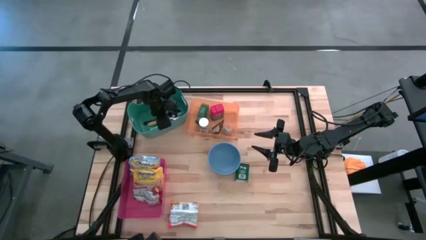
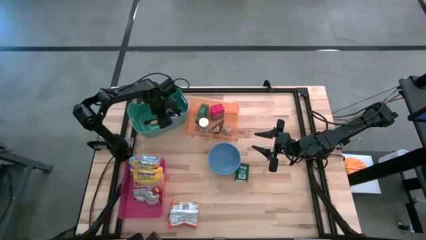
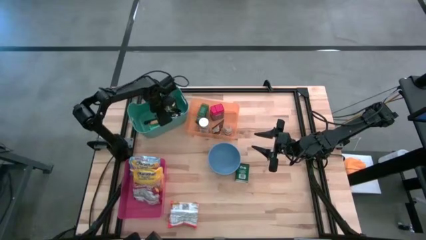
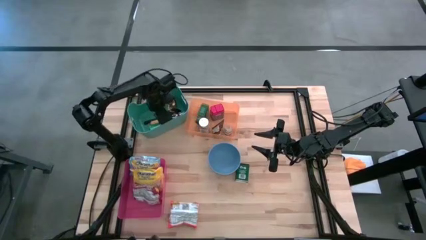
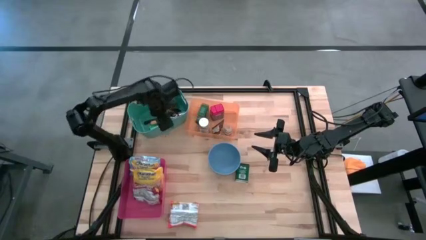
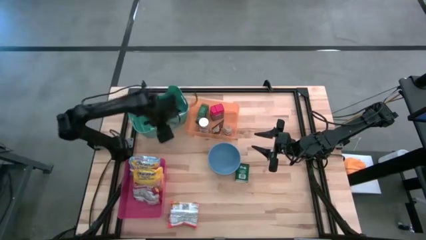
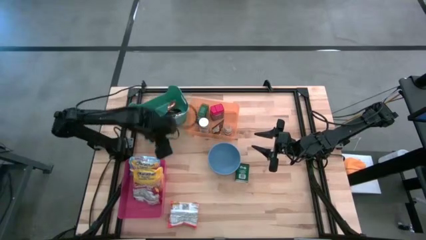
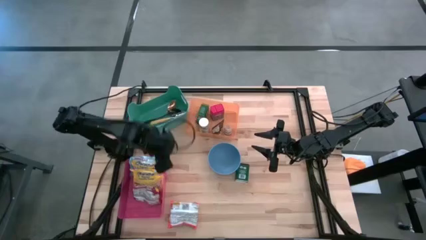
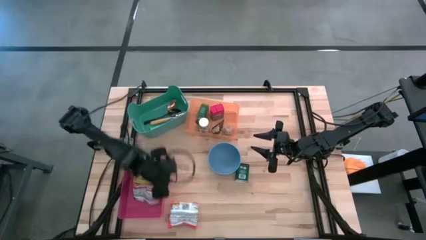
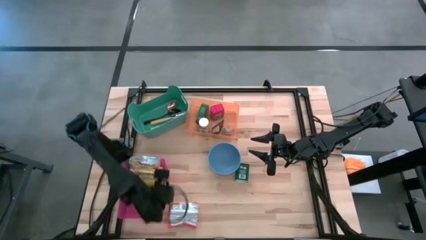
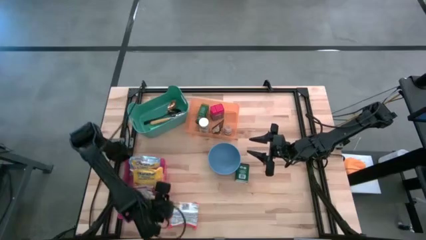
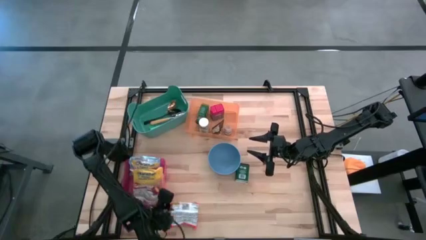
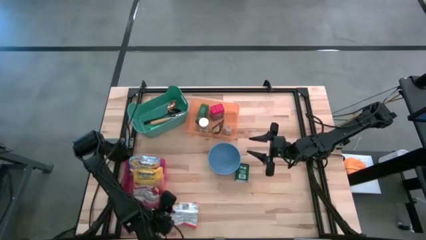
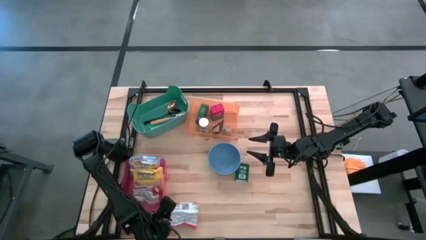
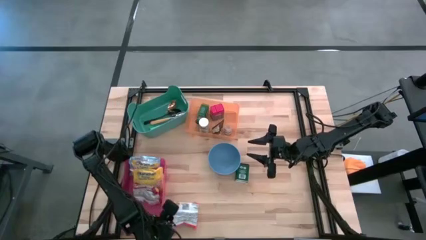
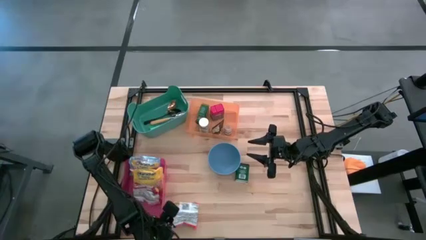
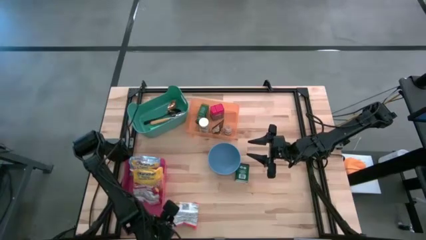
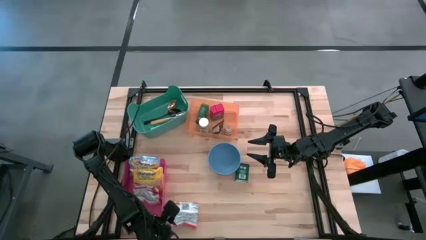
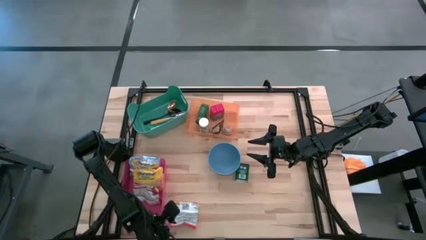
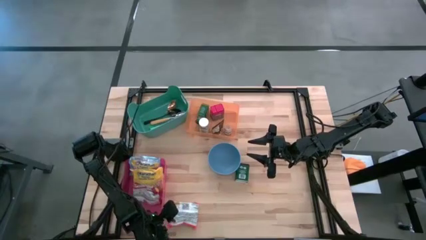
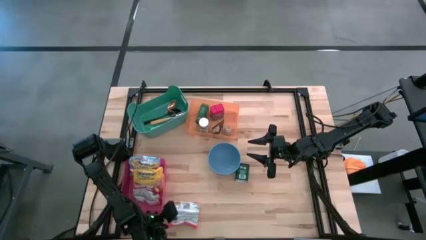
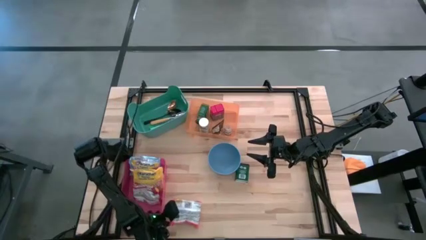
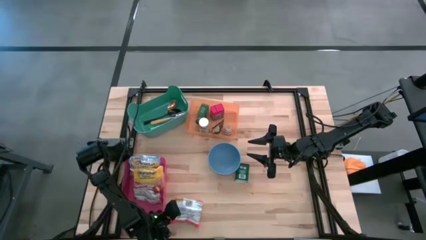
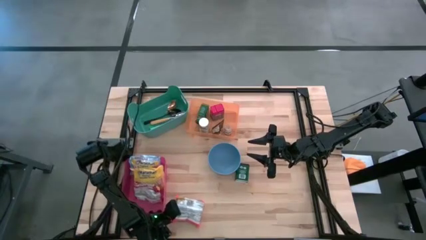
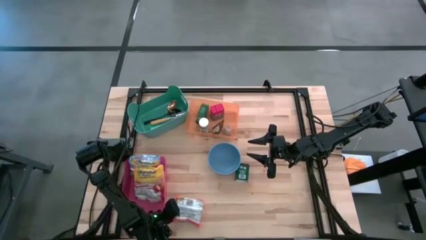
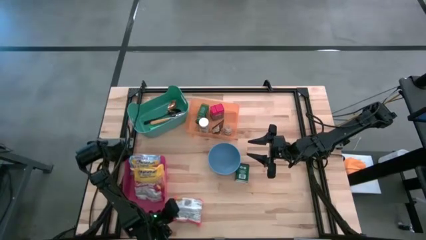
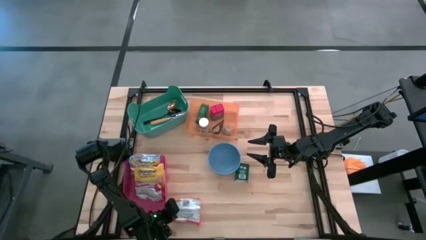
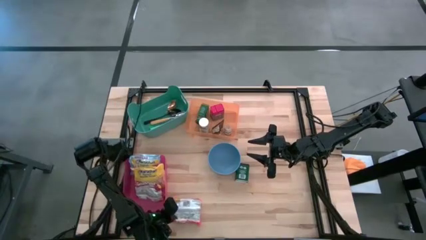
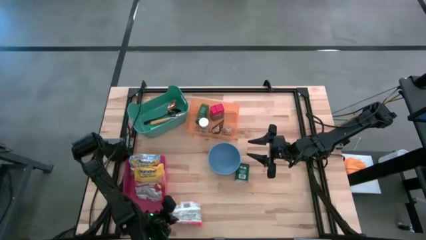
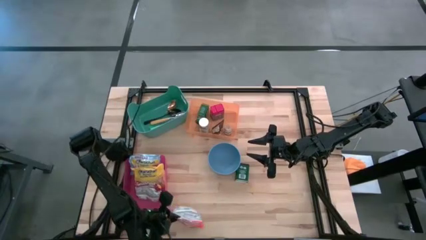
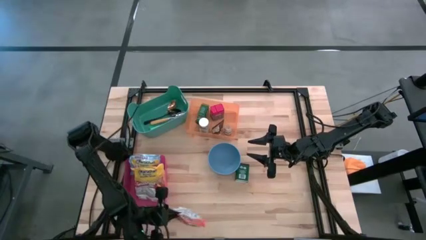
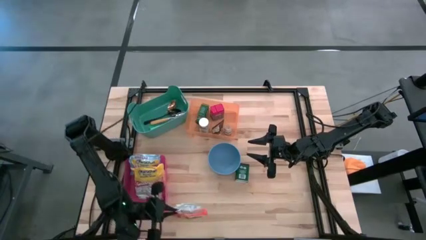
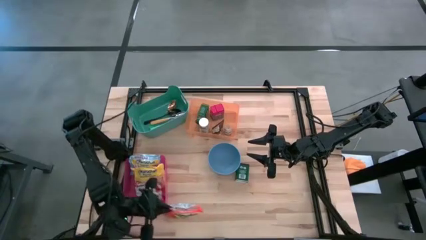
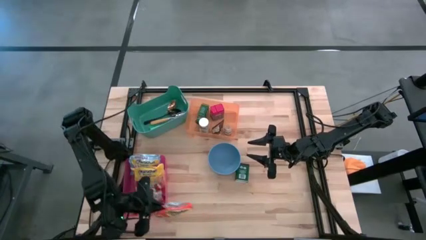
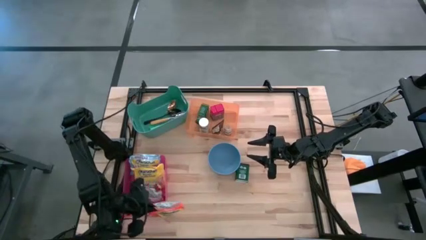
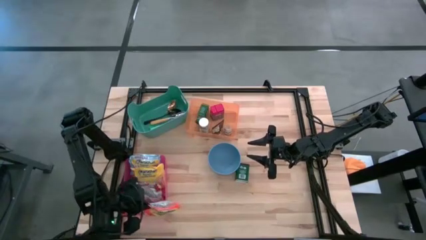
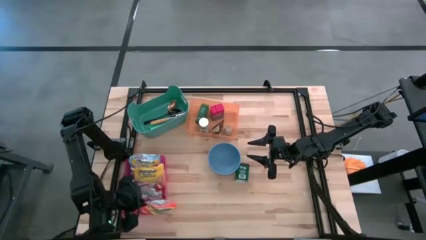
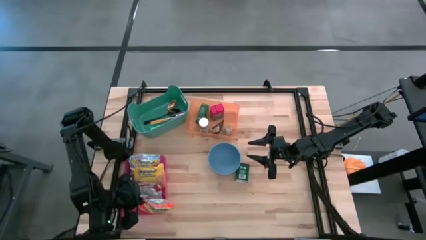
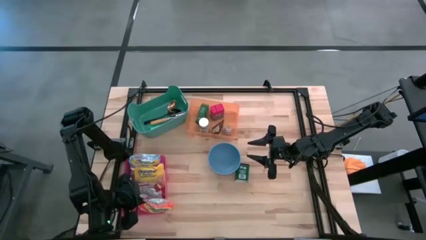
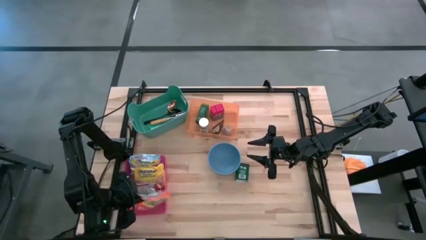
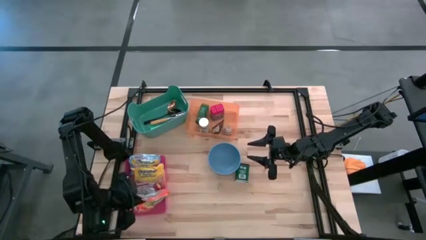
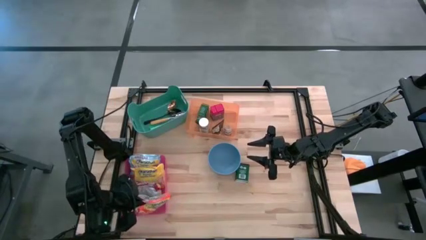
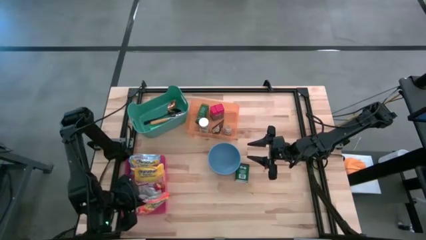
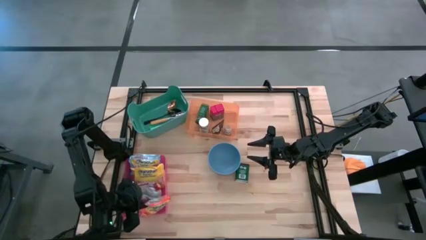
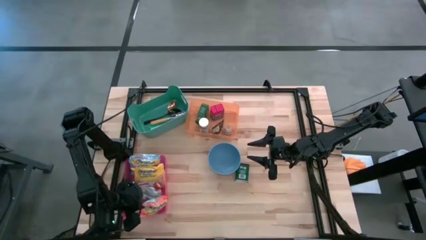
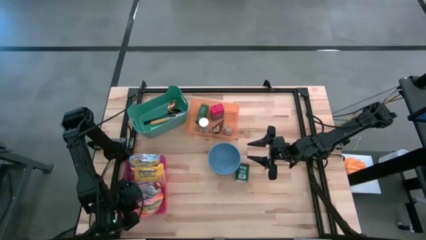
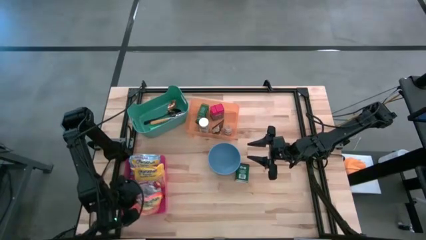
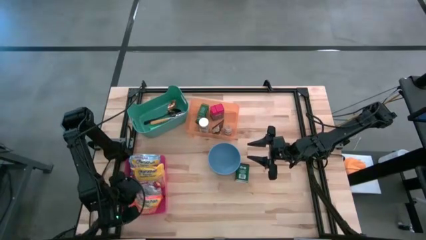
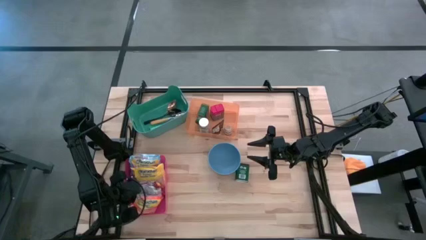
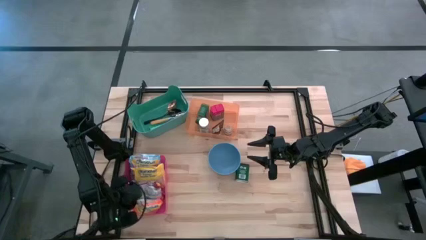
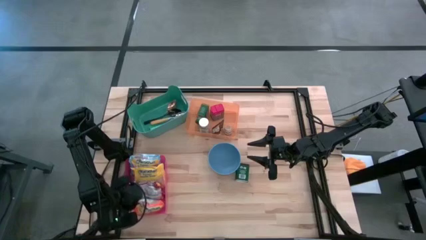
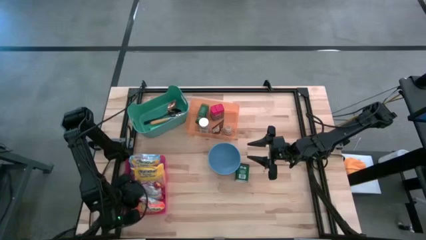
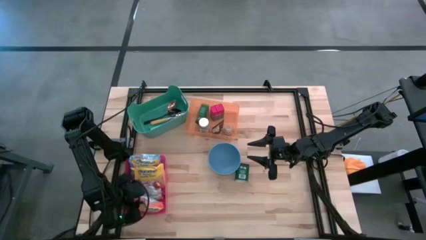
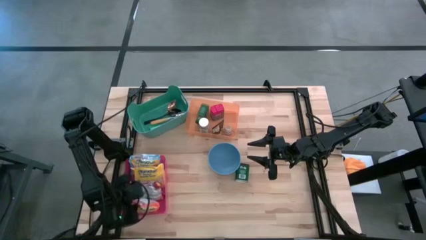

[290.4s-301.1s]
Put the orange noodle pack into the pink bin
